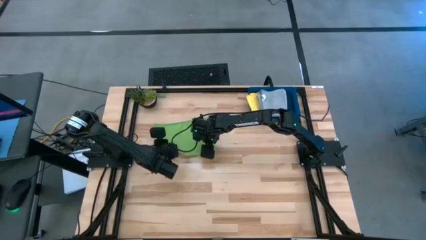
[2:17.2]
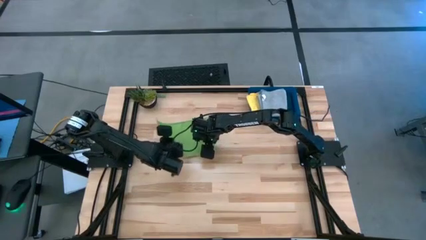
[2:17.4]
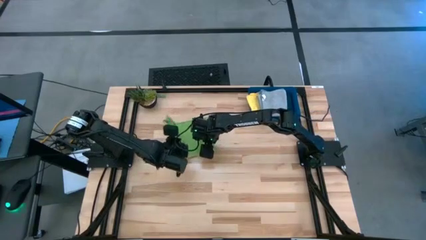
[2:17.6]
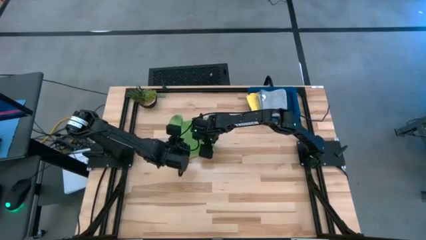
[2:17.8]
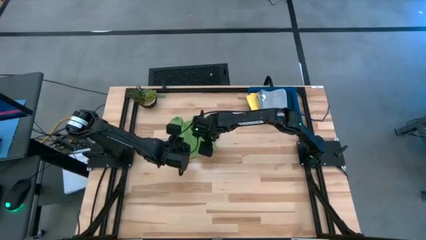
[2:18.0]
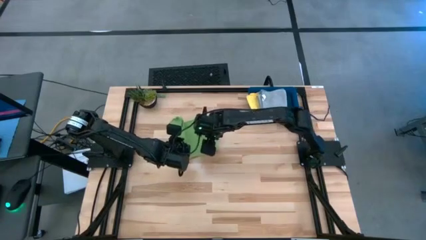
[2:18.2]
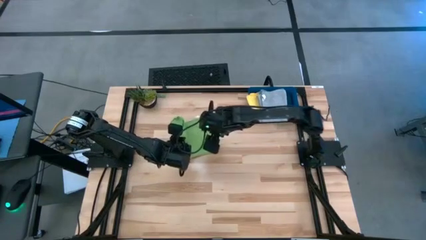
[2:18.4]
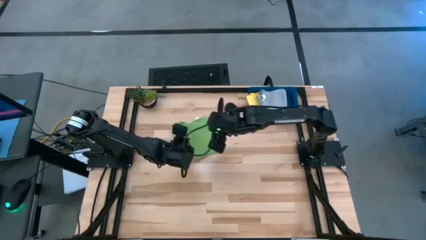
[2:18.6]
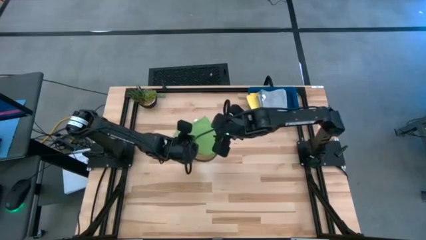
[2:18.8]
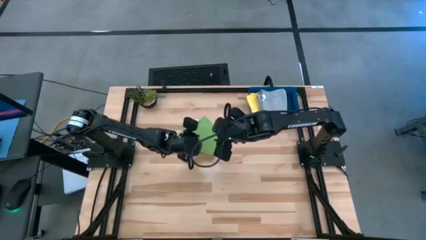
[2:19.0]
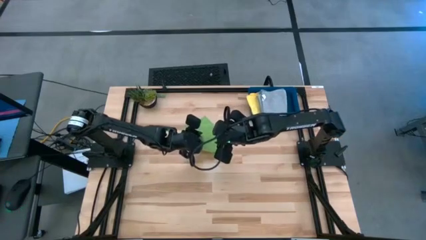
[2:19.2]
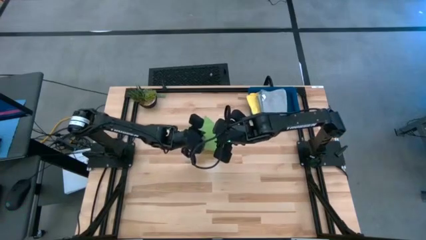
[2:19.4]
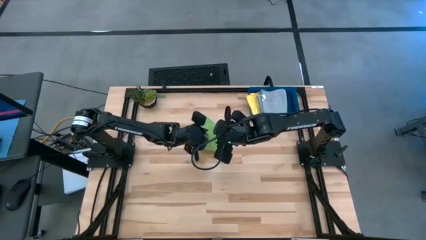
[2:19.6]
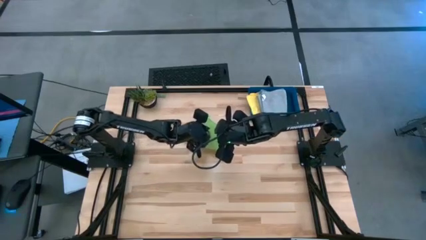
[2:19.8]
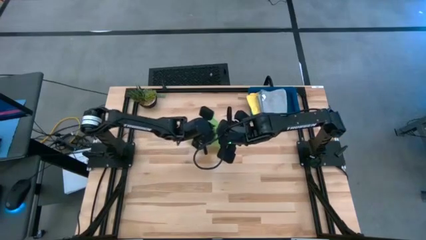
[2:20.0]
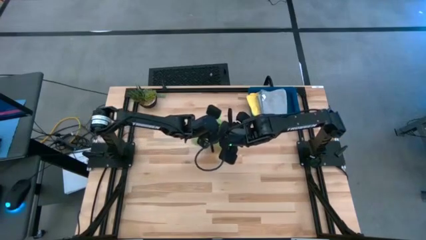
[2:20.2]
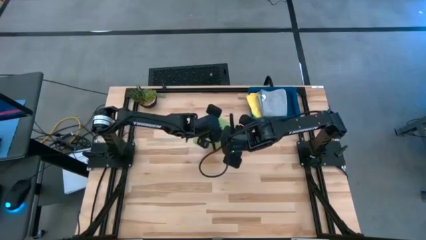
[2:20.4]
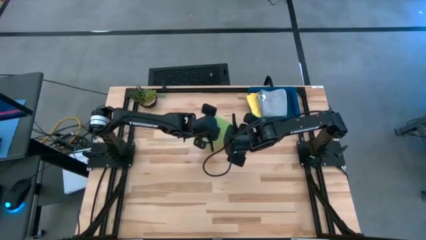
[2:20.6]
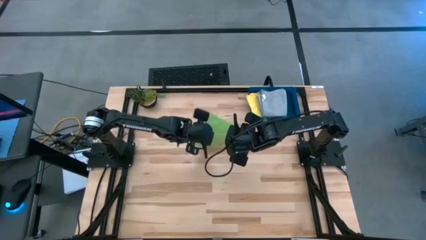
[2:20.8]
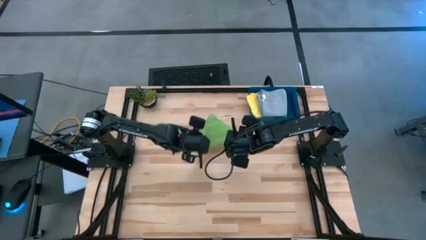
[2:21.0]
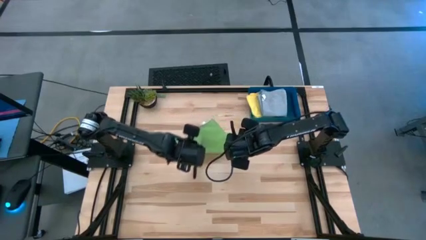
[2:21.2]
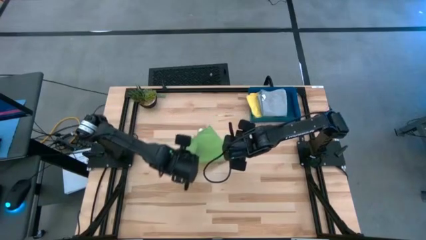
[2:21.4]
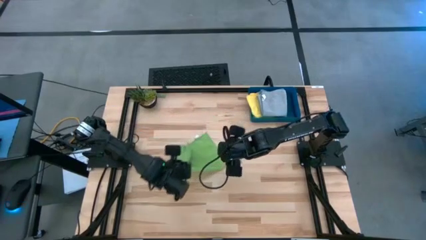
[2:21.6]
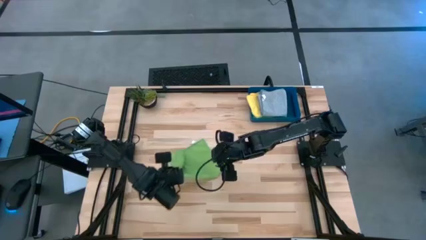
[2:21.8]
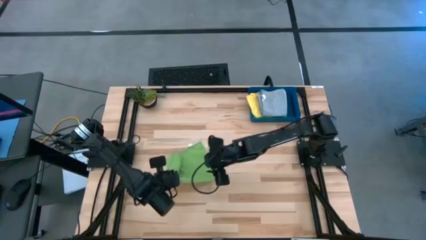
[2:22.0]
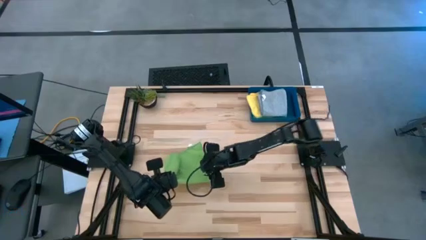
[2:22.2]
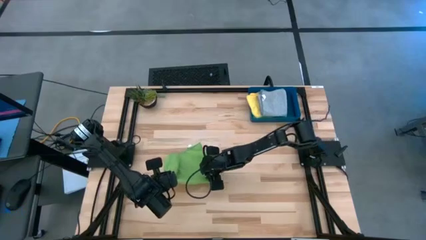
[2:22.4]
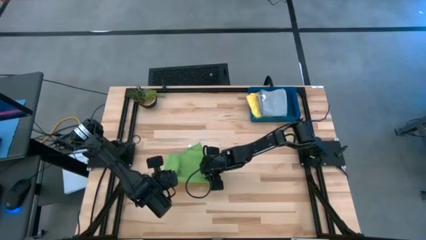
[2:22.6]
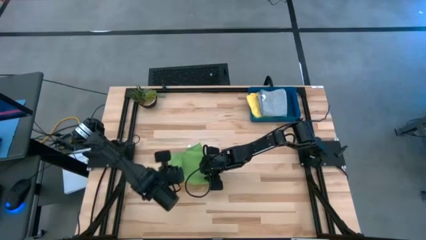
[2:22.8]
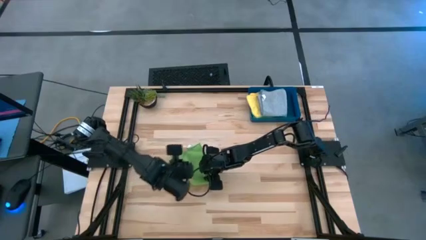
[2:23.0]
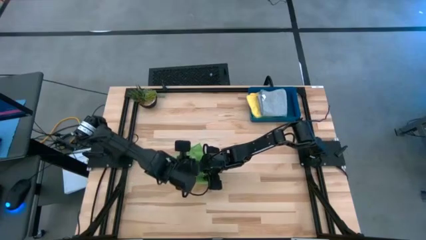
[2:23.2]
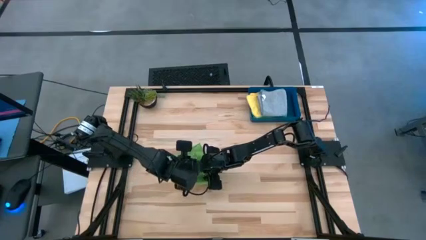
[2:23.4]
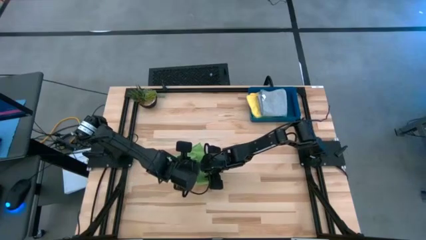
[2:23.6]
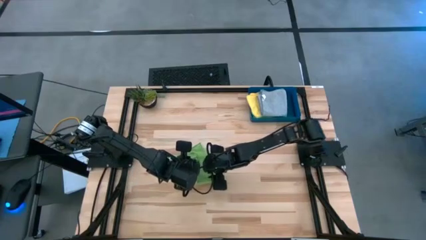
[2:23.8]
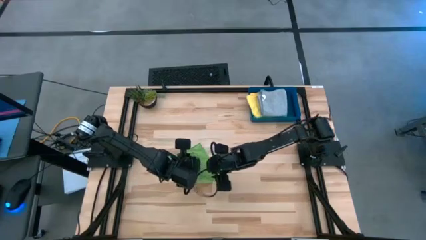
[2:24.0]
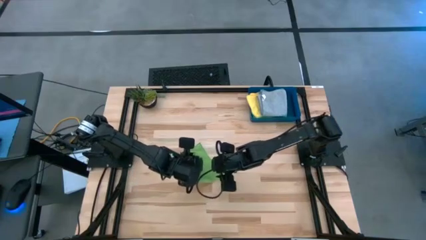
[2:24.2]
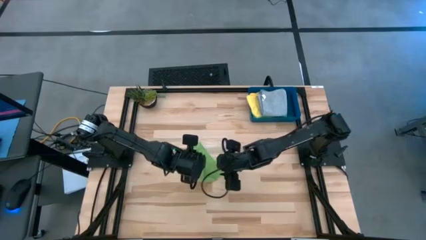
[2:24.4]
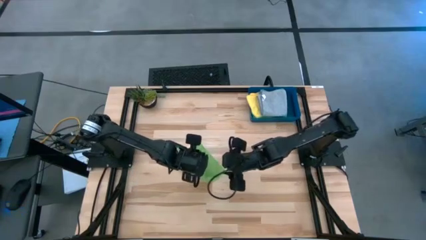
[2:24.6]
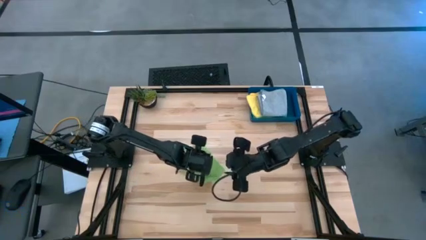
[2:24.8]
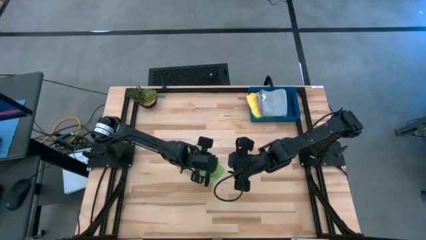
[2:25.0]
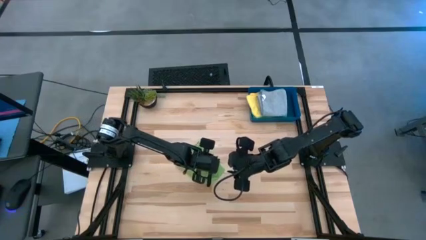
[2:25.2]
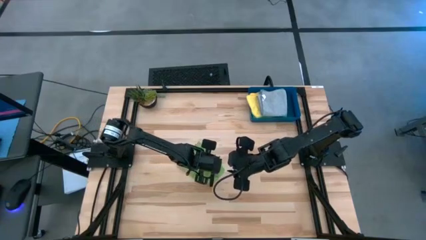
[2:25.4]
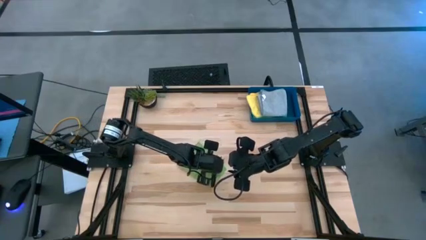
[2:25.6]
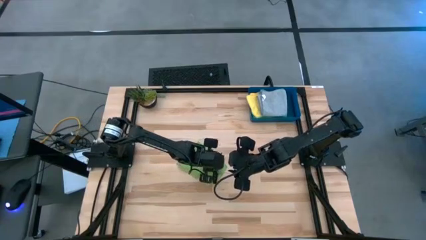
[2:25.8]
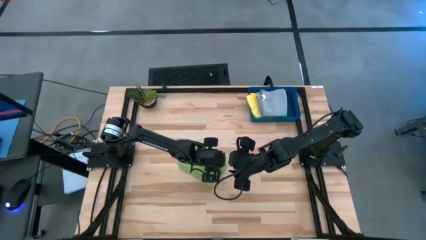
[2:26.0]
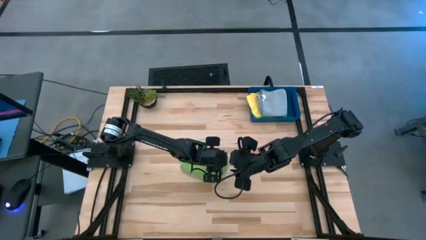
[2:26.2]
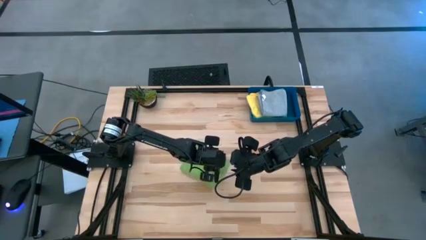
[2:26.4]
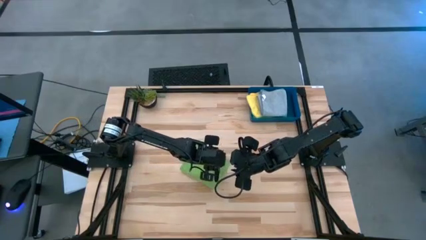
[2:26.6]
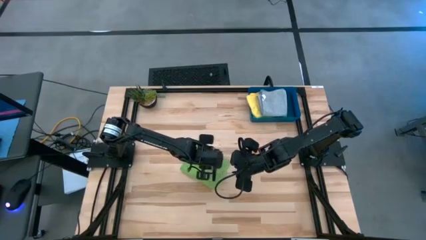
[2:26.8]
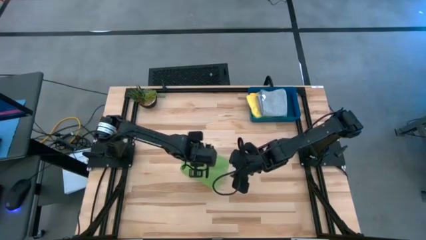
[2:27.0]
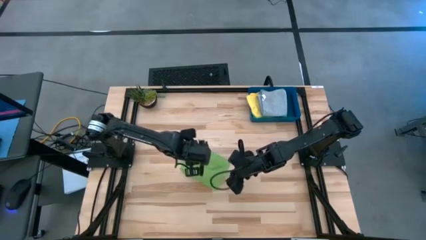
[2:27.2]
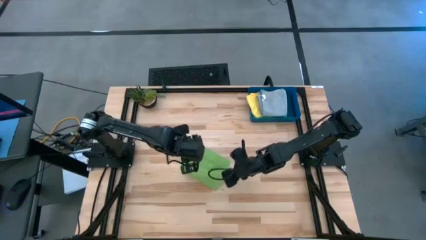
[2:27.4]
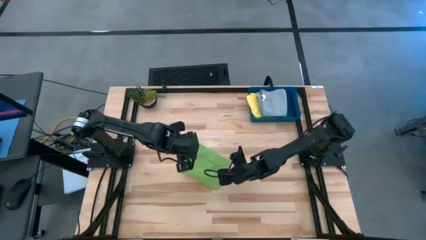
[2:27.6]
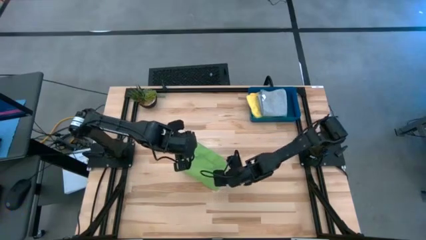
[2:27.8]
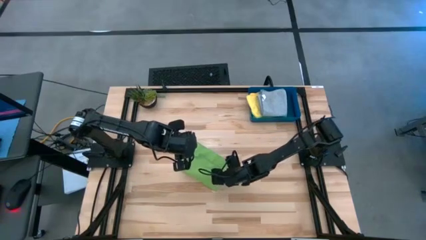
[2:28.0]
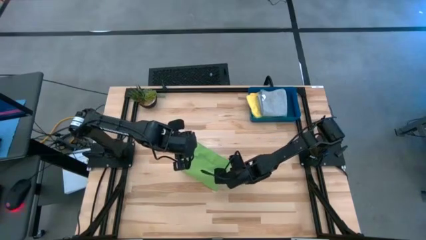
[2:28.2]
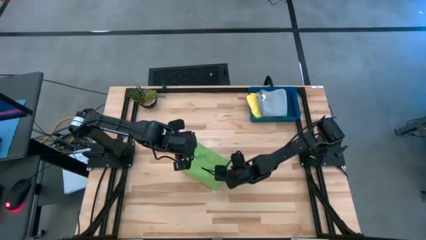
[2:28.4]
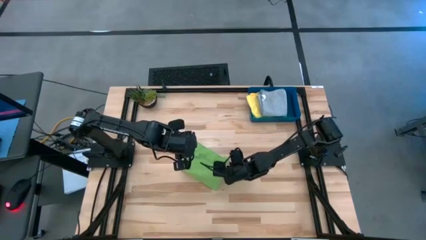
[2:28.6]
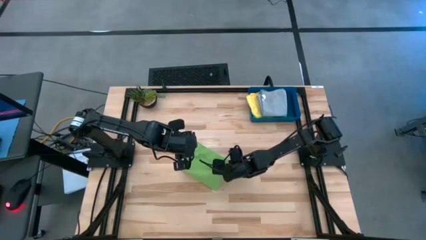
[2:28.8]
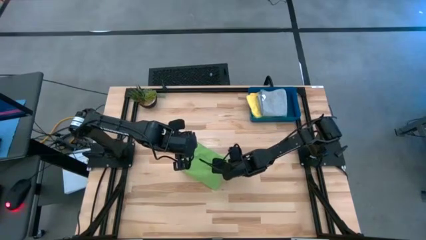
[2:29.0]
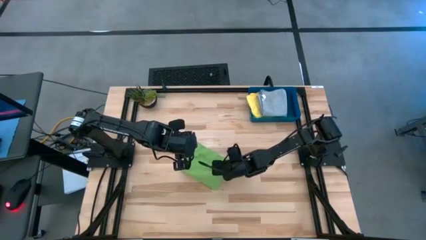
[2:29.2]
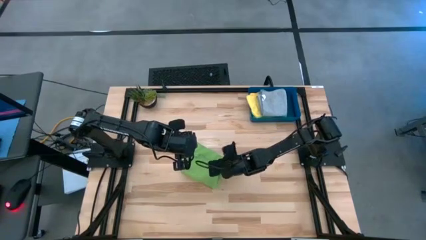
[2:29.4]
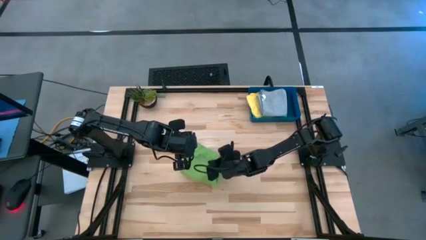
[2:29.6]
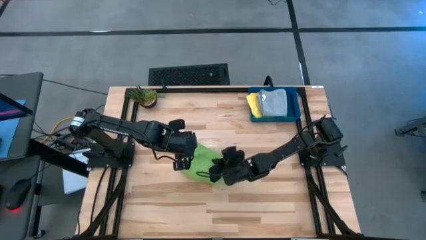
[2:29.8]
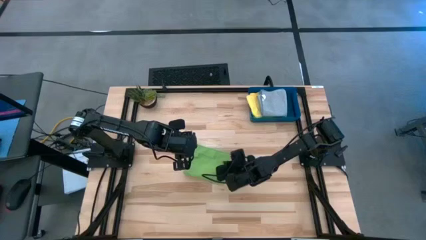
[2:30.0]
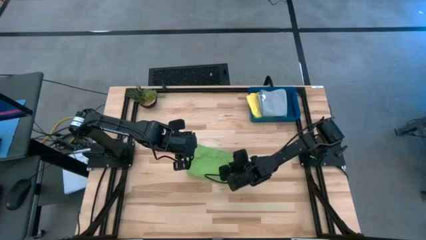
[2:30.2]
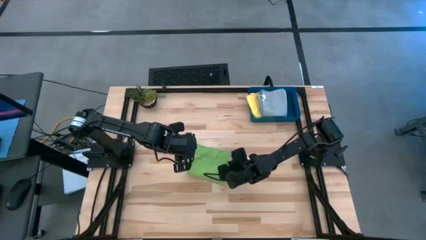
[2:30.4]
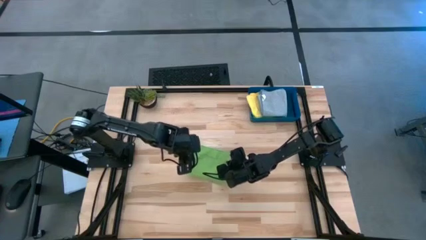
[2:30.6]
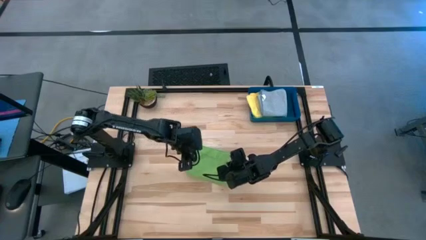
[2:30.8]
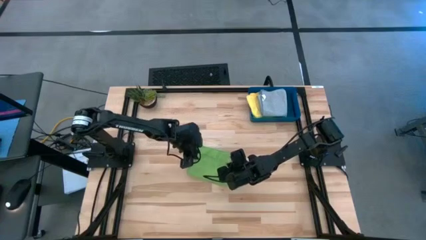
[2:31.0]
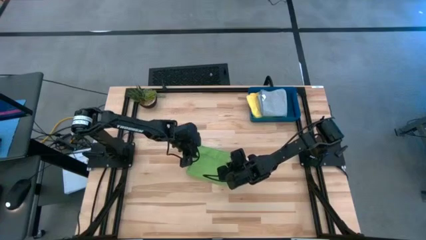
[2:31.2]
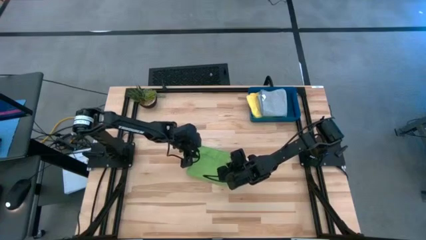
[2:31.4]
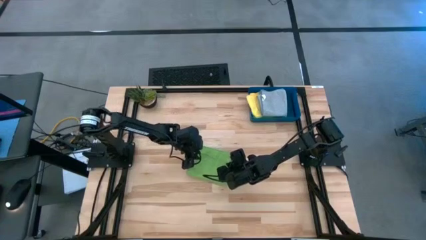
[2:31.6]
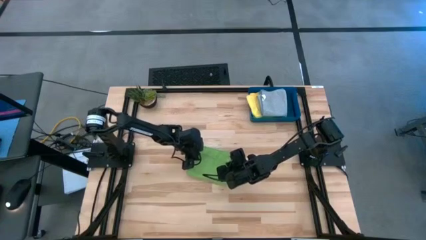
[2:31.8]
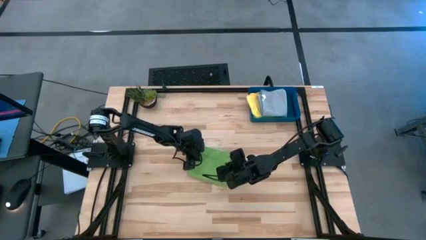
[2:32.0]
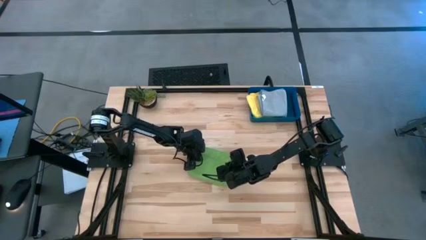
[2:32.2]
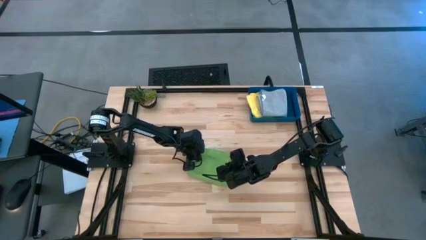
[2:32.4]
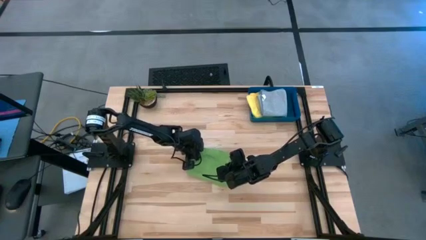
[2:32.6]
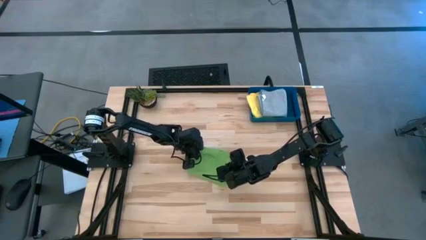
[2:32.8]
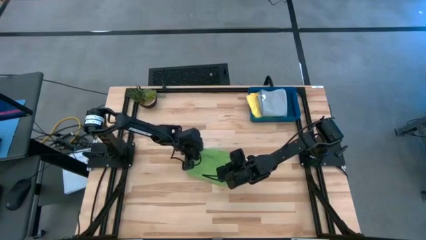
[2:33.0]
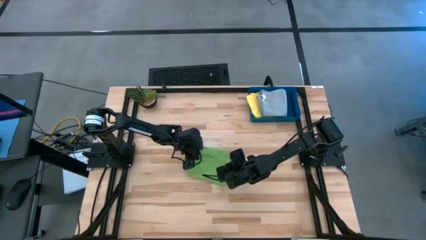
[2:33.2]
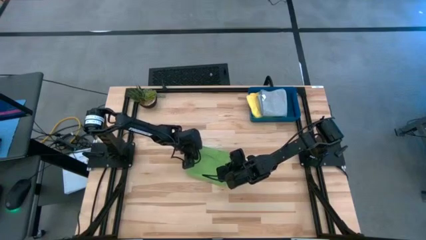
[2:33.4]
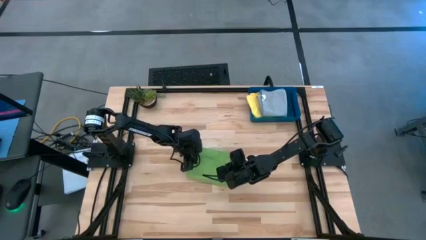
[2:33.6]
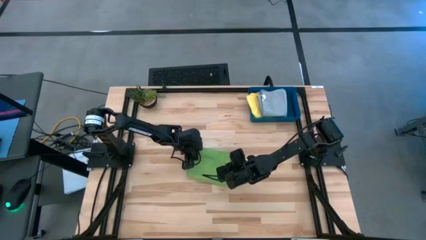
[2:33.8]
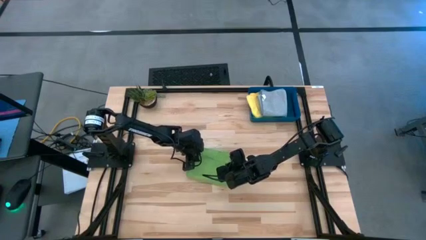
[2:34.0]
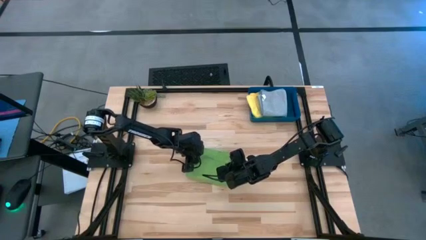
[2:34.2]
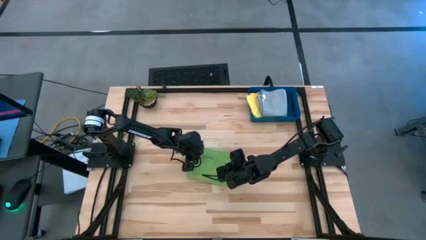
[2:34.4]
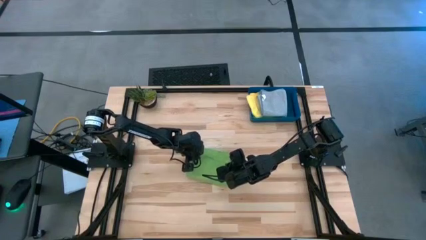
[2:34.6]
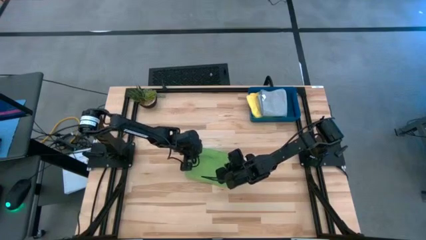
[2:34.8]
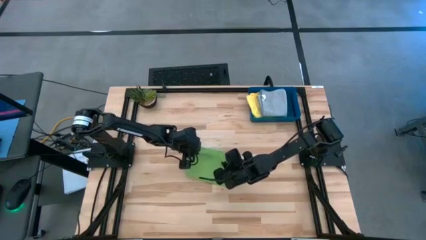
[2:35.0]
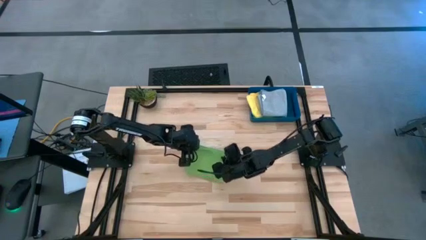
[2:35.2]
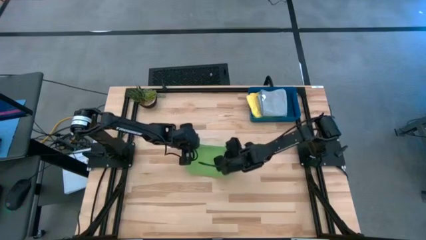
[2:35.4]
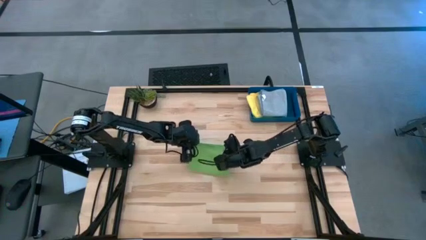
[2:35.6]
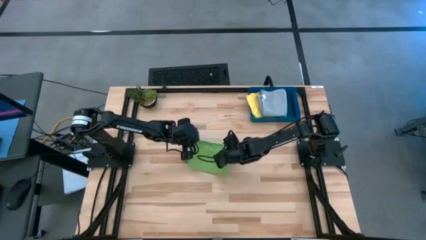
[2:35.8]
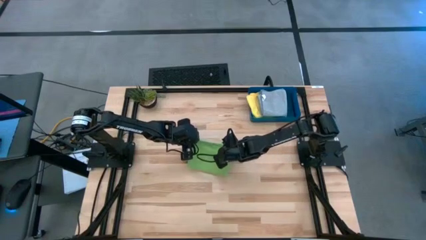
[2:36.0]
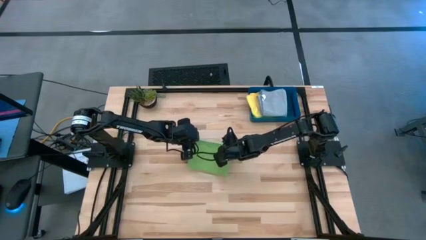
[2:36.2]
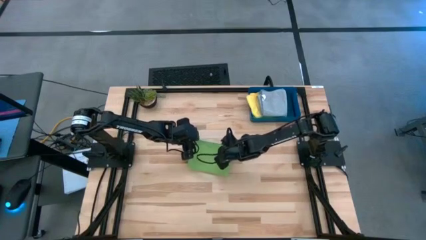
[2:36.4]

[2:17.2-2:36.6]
Task: Fold microfiber towels
Fold the green microfiber cloth
